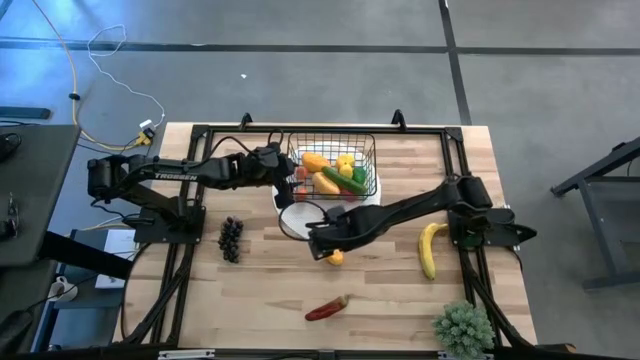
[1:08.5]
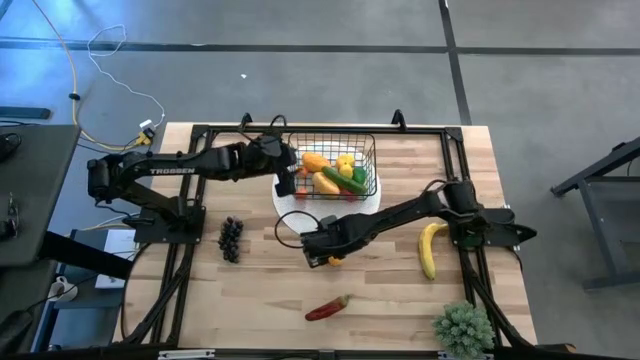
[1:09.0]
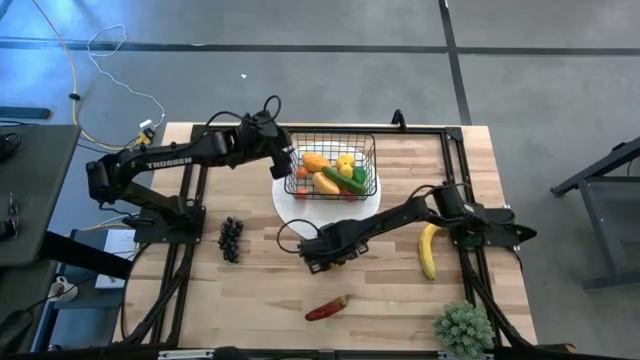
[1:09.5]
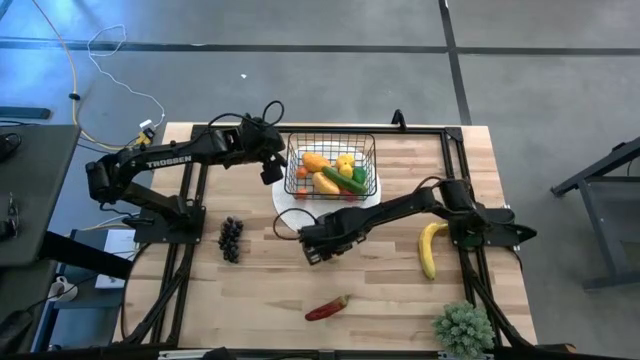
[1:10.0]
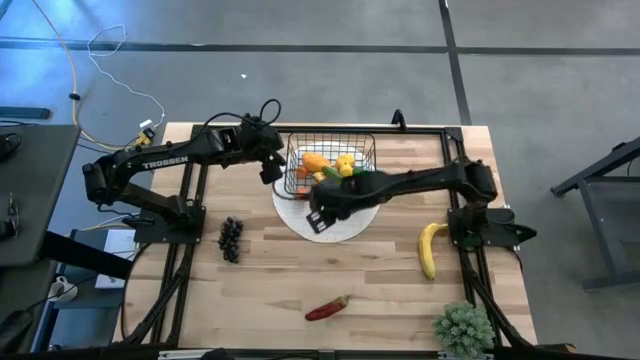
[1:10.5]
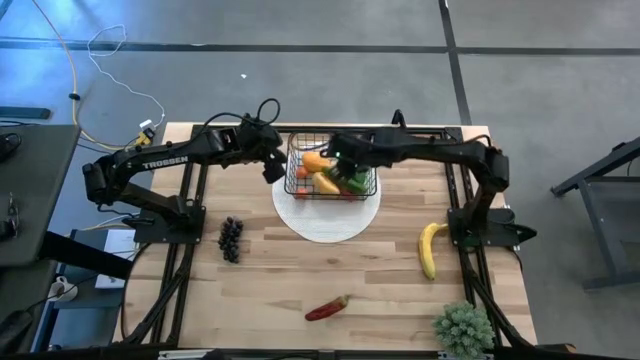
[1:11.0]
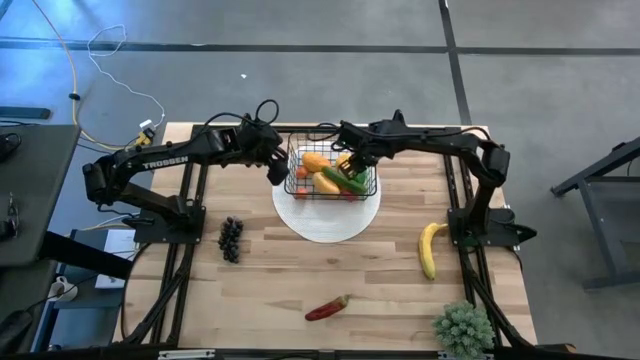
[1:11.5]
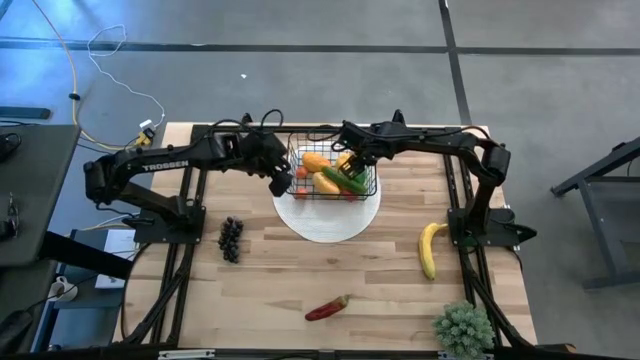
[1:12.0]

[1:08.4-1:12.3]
Task: Build produce basket
Put the yellow lemon into the black wire basket

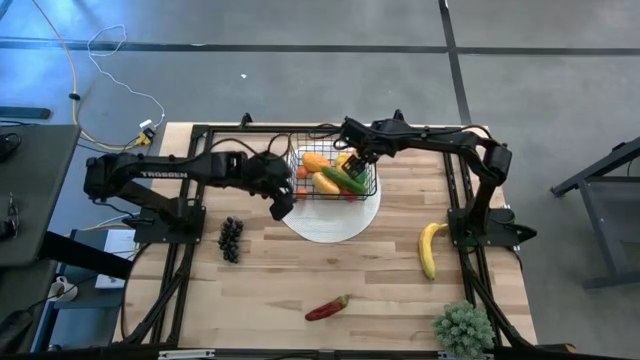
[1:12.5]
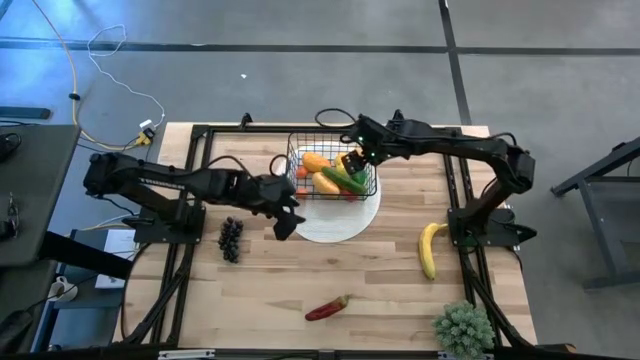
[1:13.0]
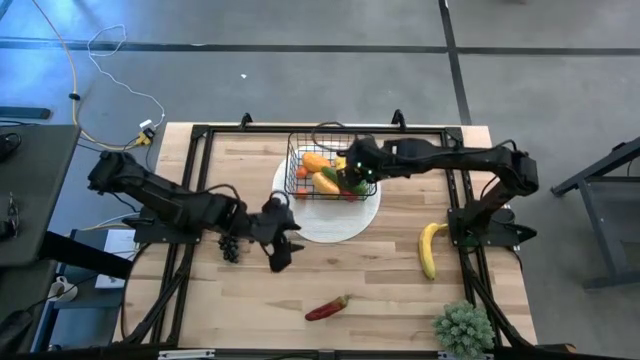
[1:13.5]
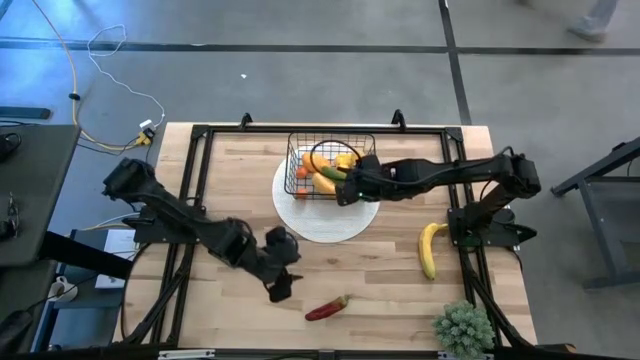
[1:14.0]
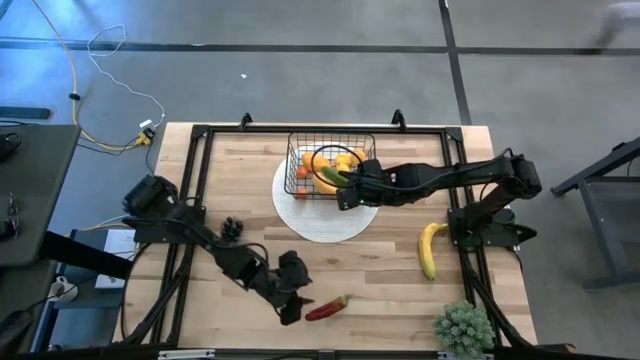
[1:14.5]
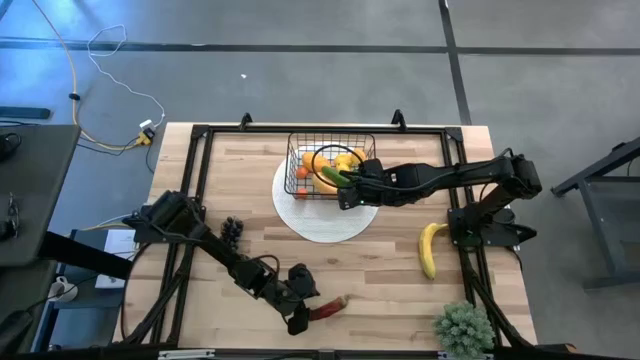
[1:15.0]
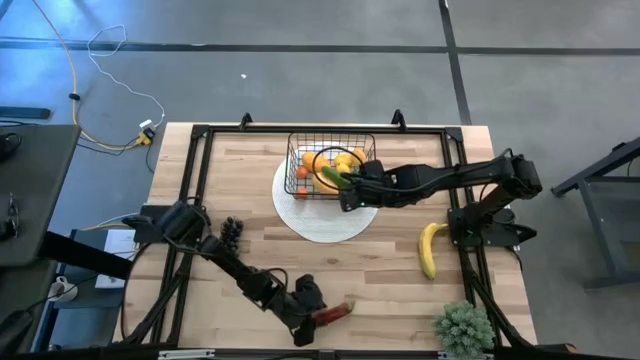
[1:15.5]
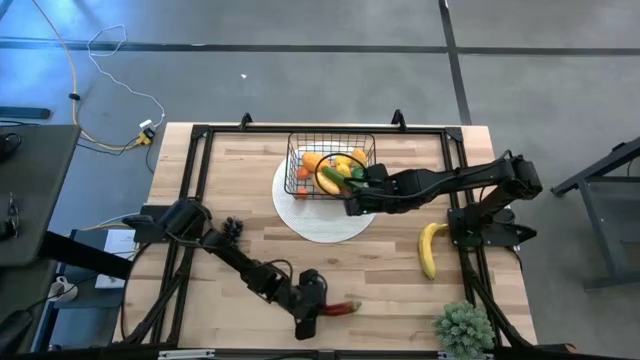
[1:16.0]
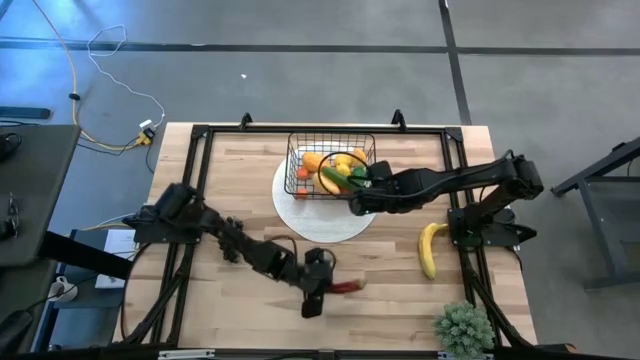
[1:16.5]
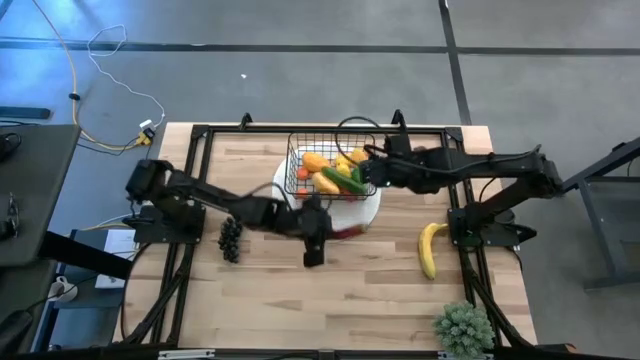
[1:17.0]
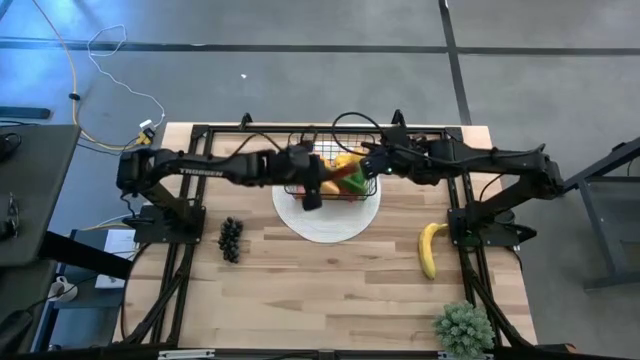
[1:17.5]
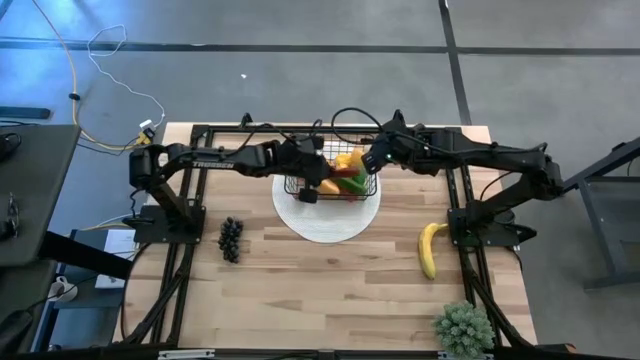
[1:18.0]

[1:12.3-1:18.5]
Put the red chili pepper into the black wire basket

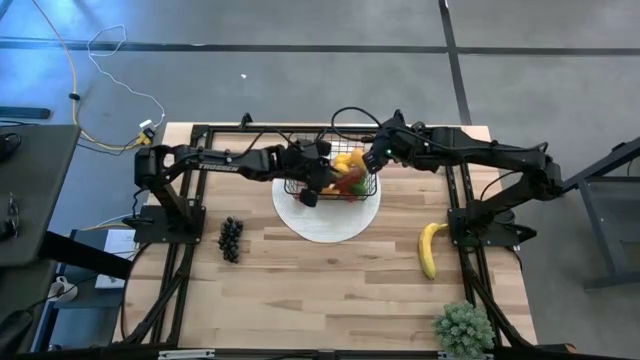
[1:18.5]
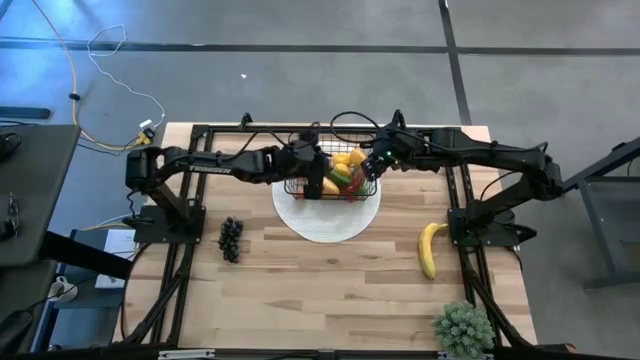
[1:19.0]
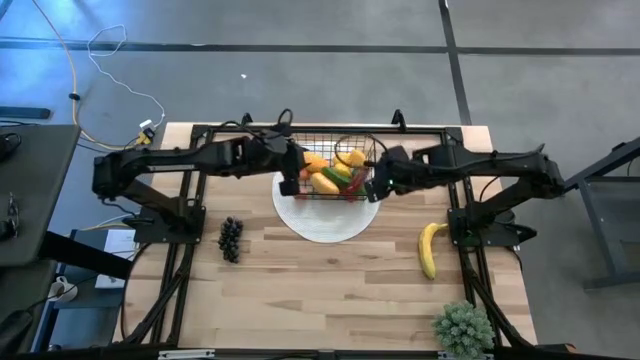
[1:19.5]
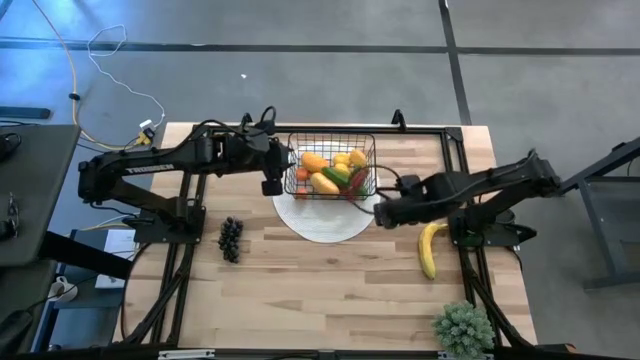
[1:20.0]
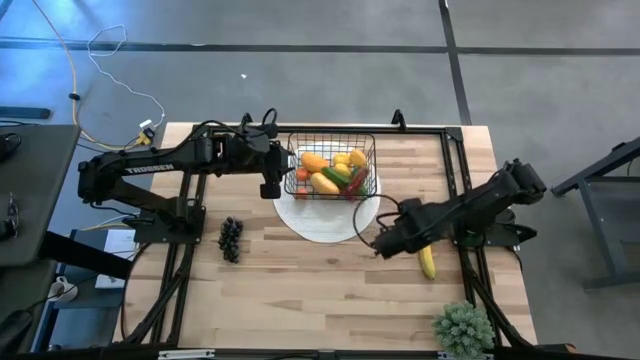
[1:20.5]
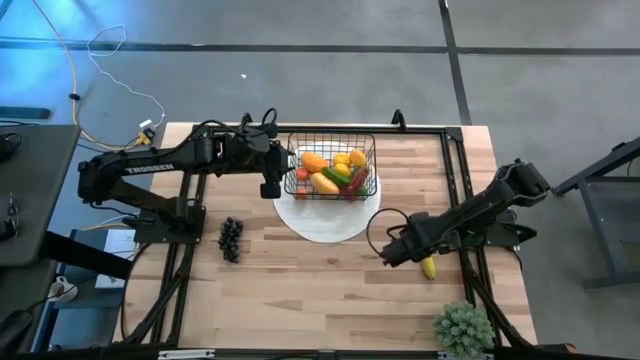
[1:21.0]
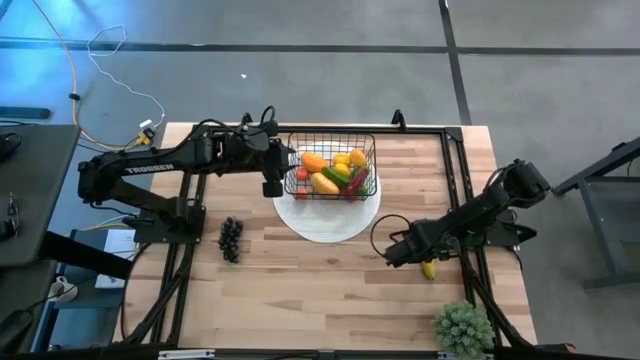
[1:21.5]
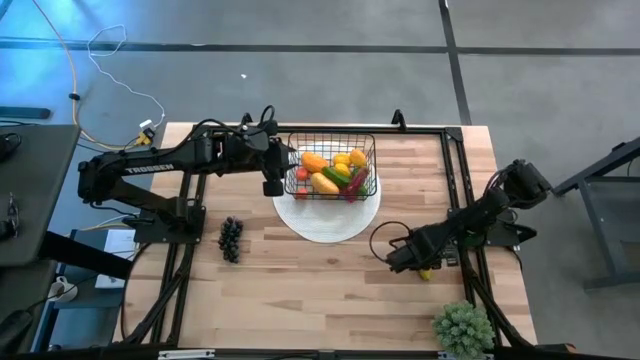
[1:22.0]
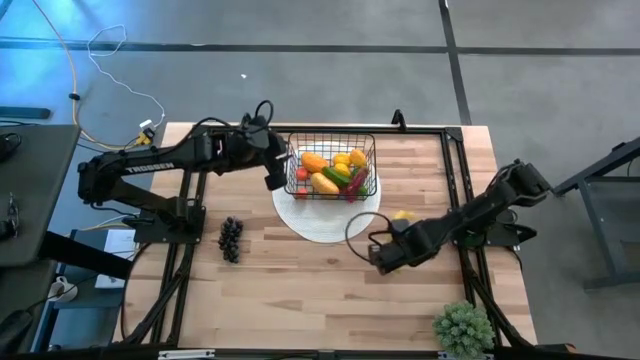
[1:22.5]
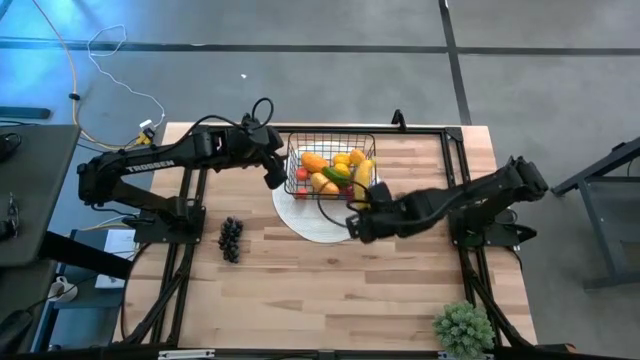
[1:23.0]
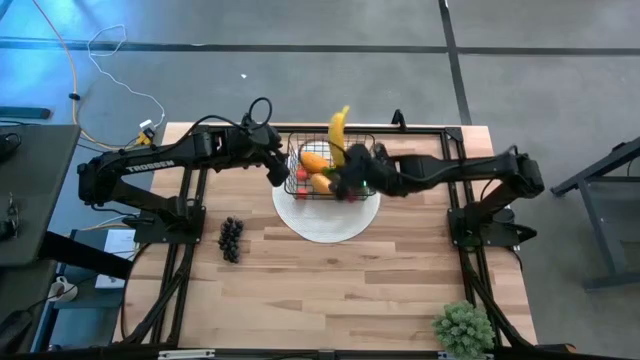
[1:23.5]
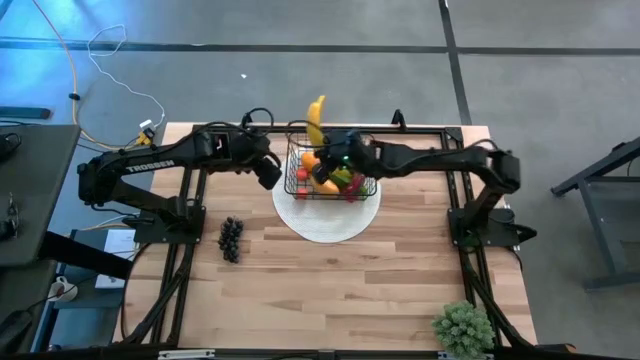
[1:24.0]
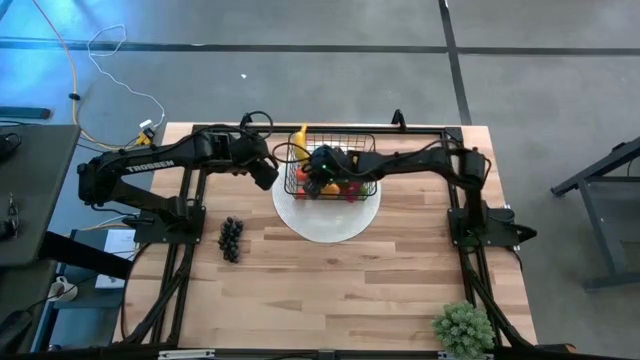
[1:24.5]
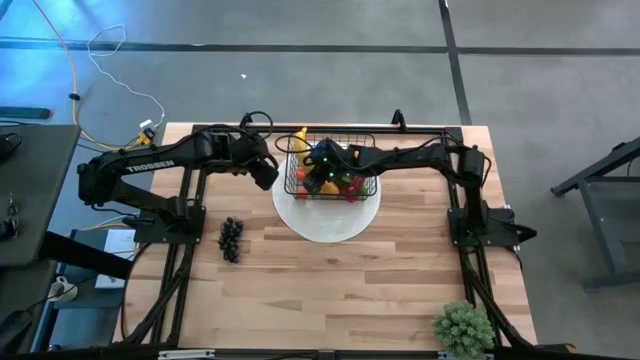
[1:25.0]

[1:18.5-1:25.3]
Put the yellow banana into the black wire basket

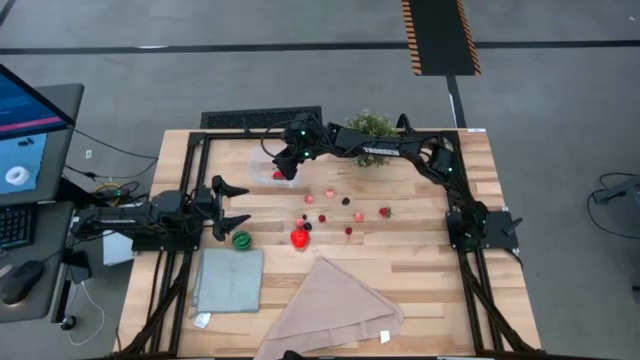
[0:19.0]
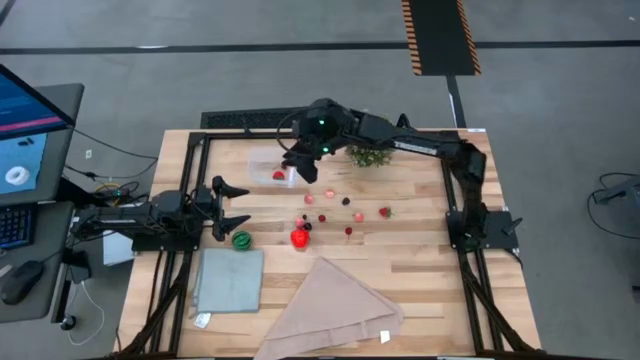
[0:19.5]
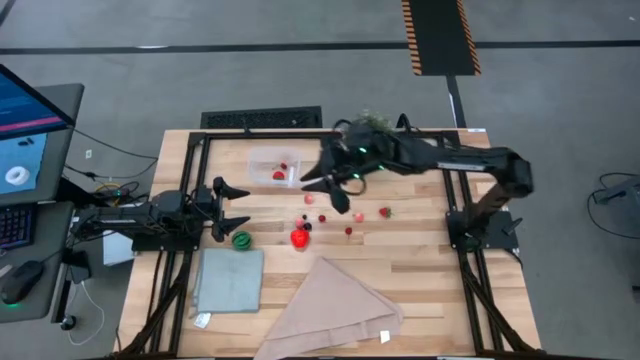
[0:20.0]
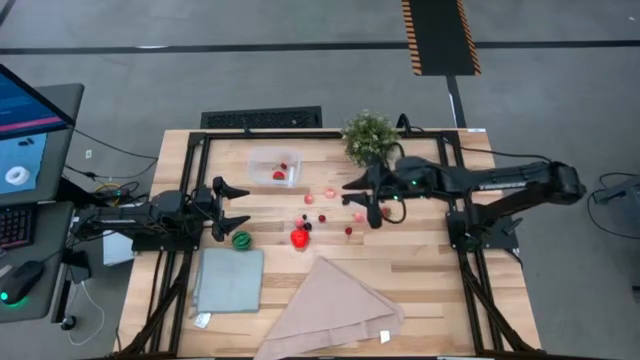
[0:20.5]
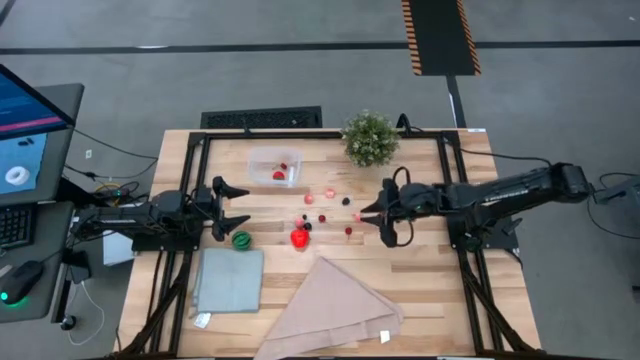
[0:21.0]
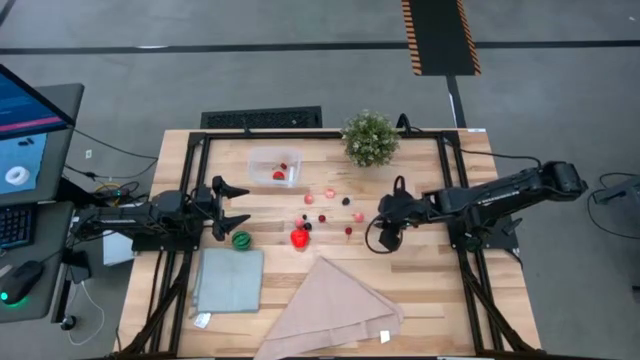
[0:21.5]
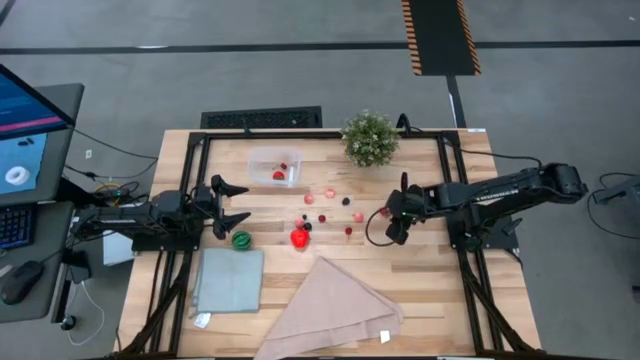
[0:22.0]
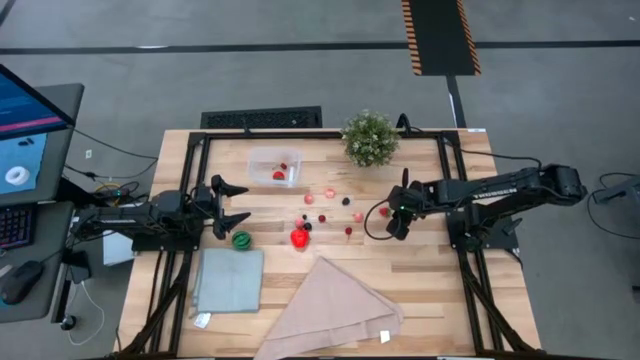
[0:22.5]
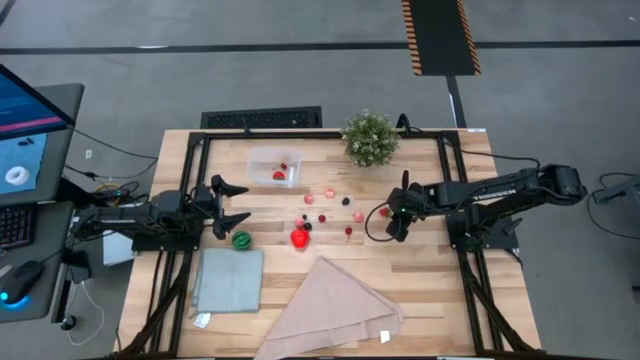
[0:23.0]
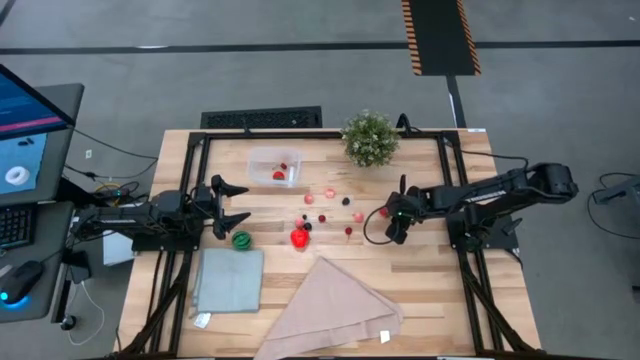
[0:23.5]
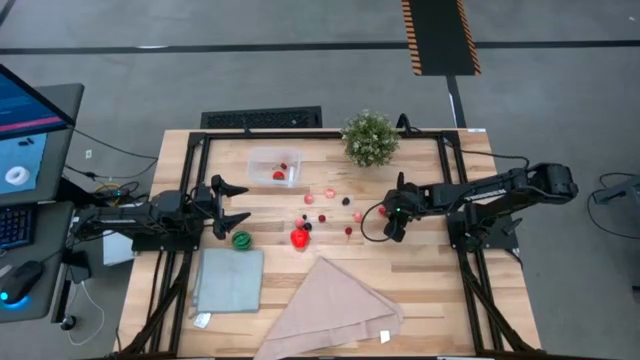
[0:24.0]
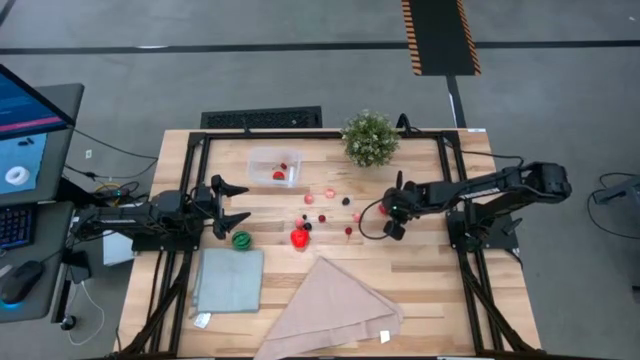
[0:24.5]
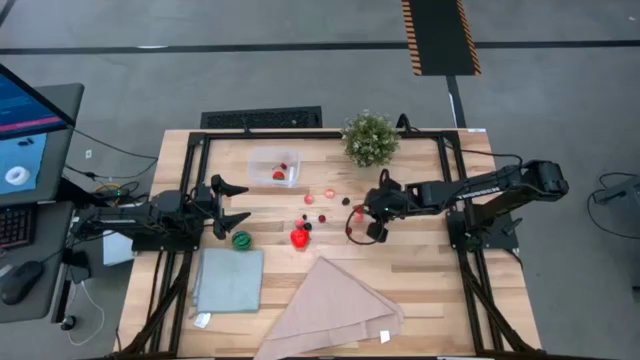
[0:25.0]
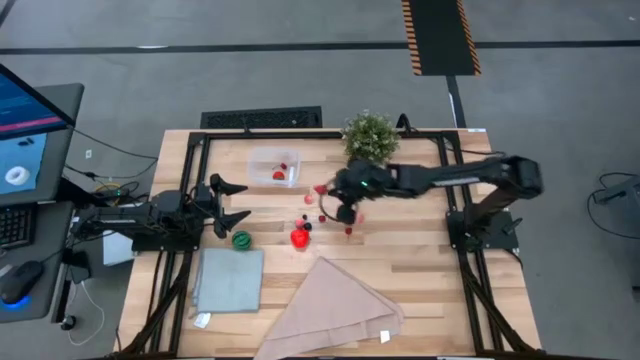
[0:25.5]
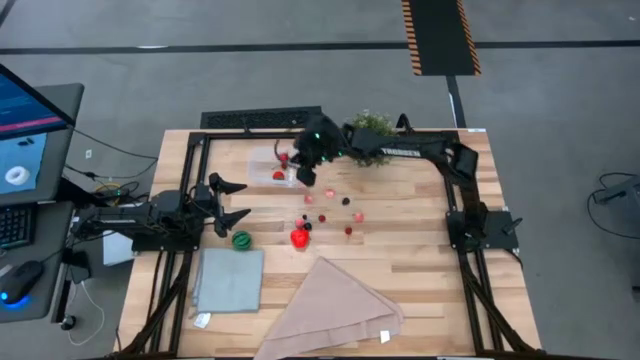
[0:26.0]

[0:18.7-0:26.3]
Task: Pick and placing Produce into tupperware
Put the red strawberry into the transparent container
